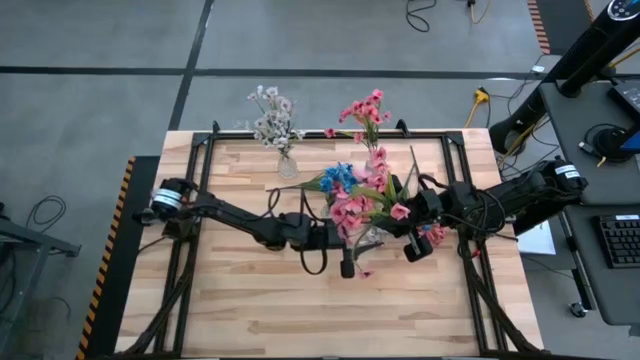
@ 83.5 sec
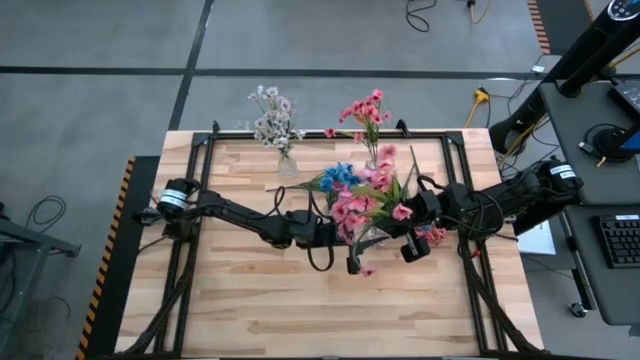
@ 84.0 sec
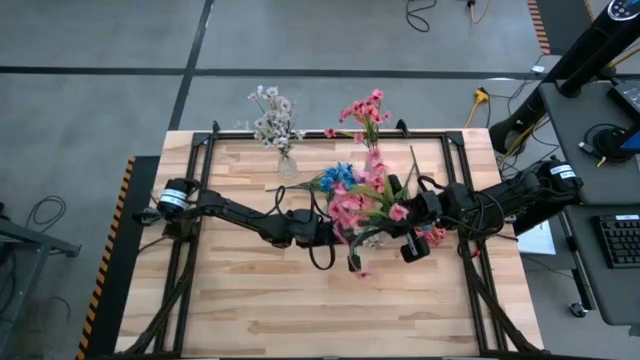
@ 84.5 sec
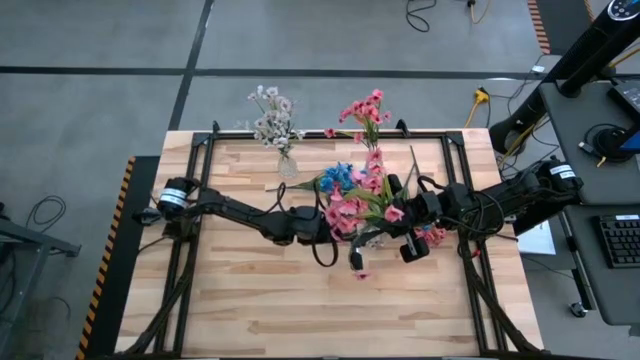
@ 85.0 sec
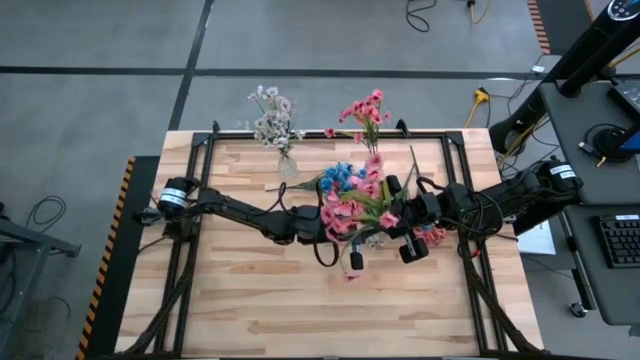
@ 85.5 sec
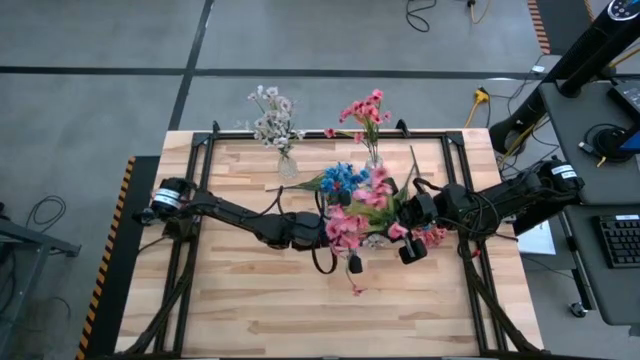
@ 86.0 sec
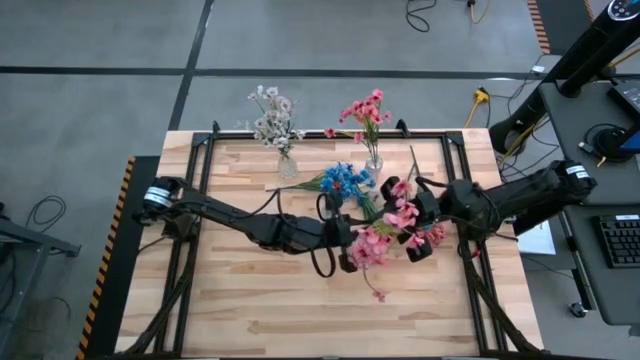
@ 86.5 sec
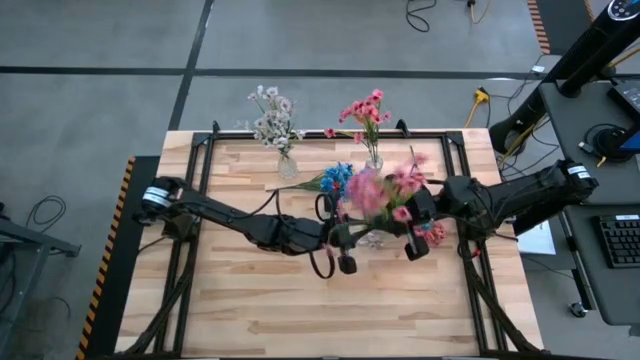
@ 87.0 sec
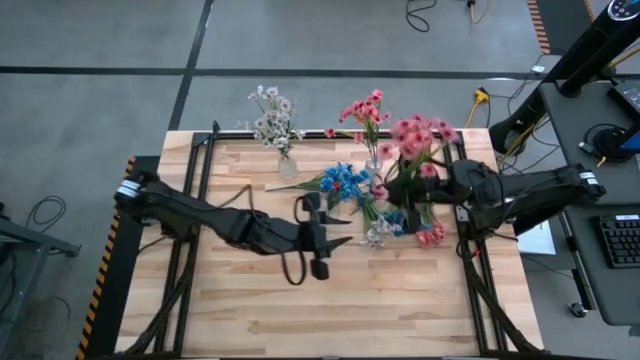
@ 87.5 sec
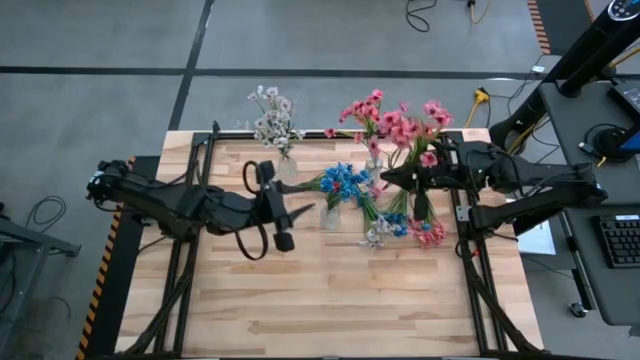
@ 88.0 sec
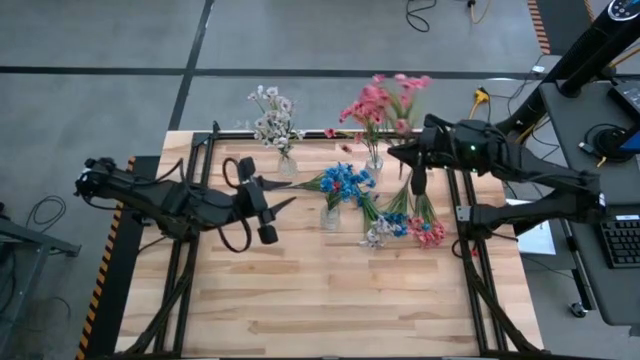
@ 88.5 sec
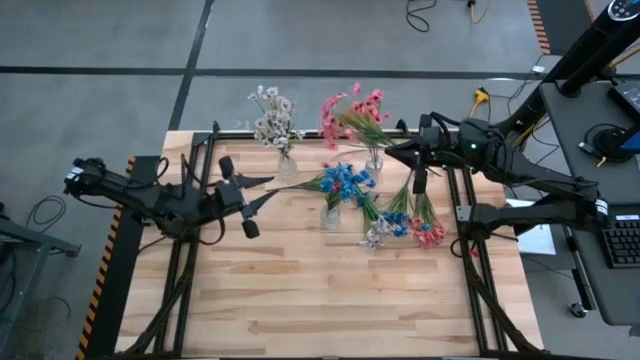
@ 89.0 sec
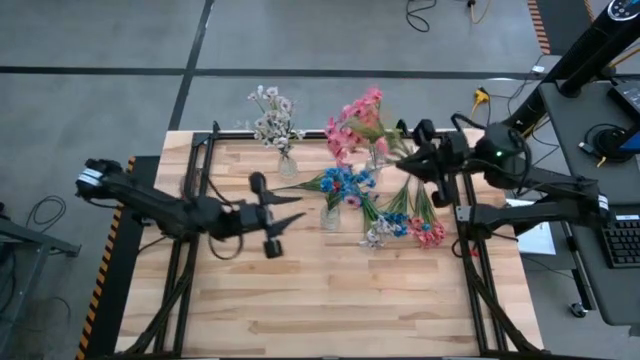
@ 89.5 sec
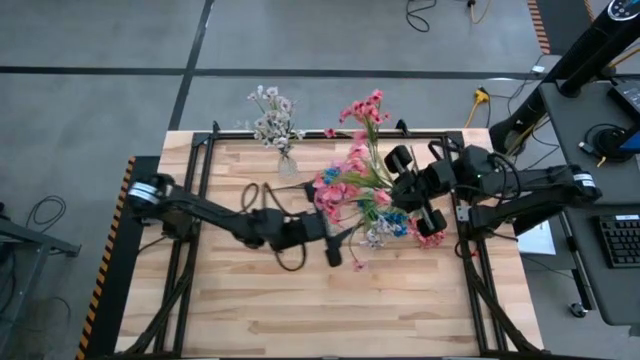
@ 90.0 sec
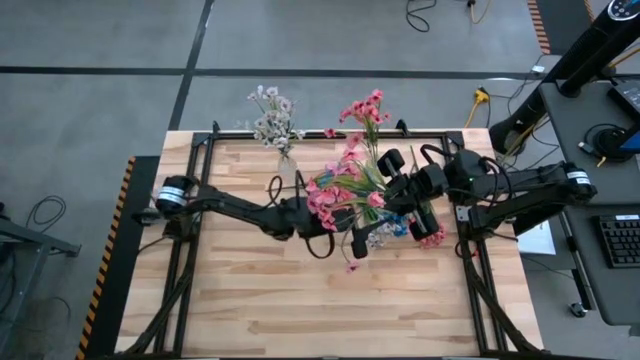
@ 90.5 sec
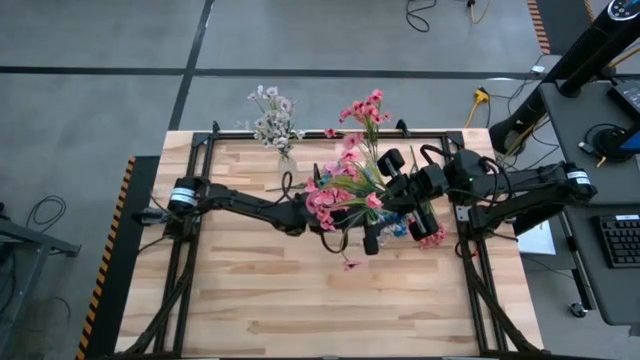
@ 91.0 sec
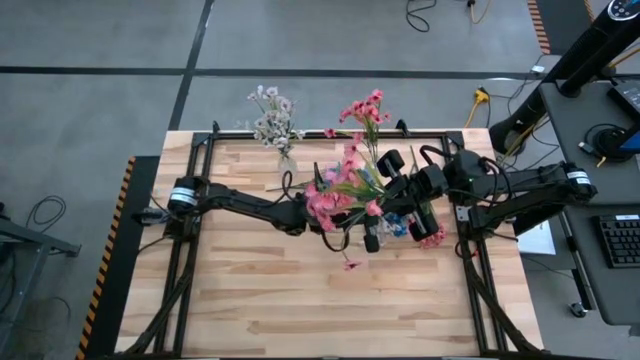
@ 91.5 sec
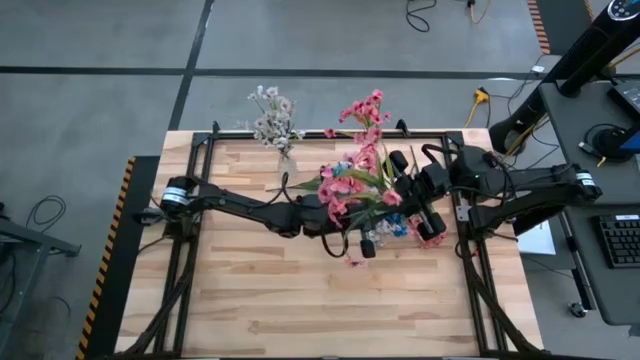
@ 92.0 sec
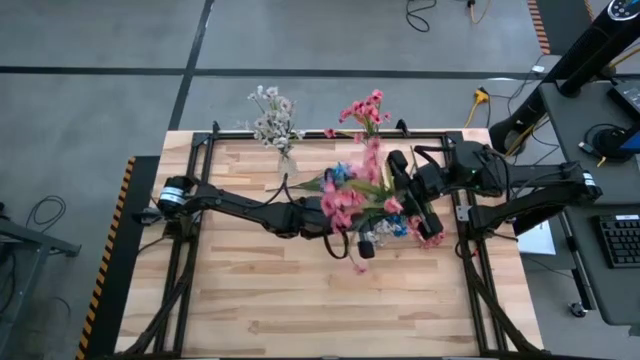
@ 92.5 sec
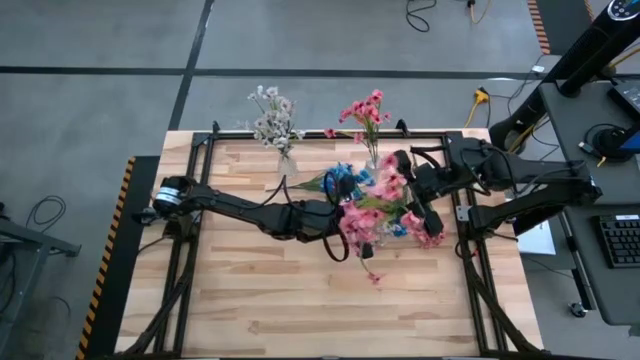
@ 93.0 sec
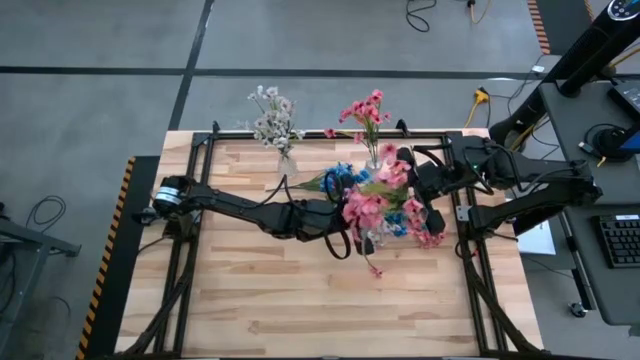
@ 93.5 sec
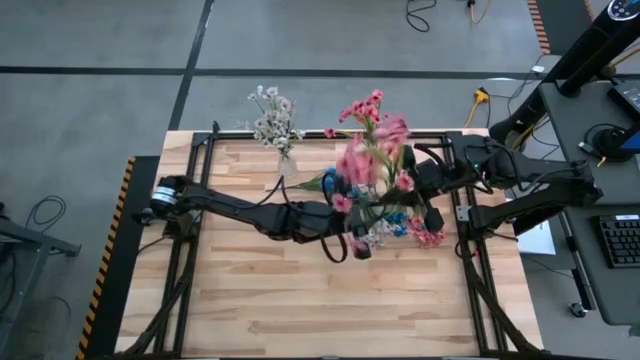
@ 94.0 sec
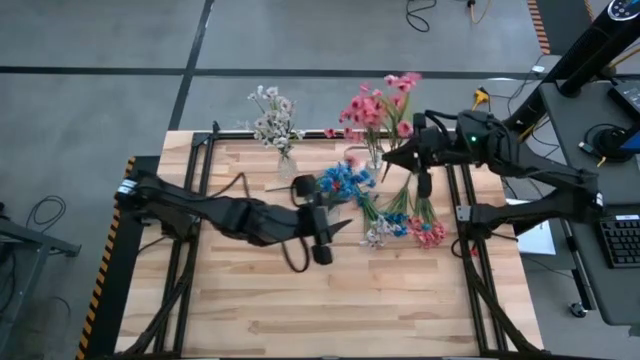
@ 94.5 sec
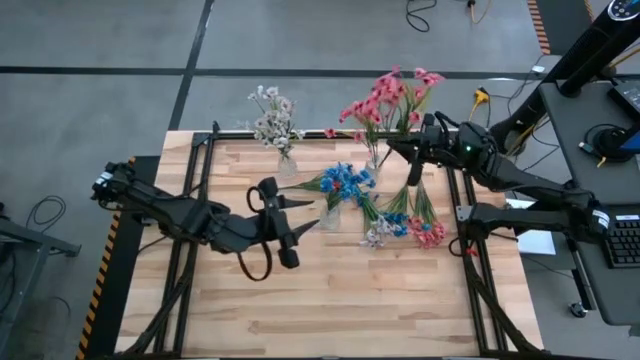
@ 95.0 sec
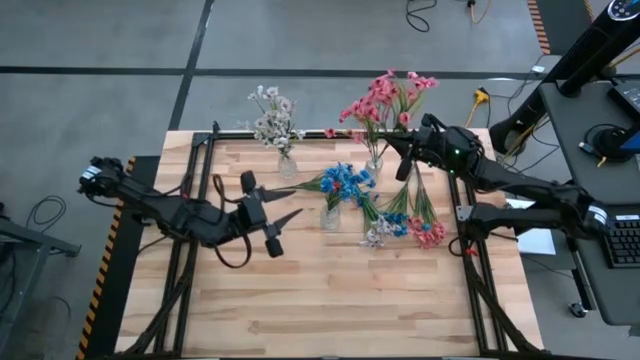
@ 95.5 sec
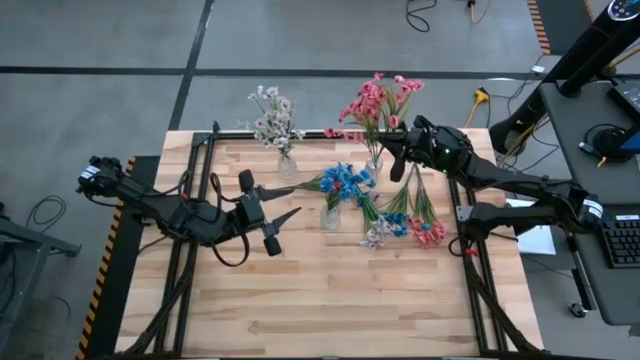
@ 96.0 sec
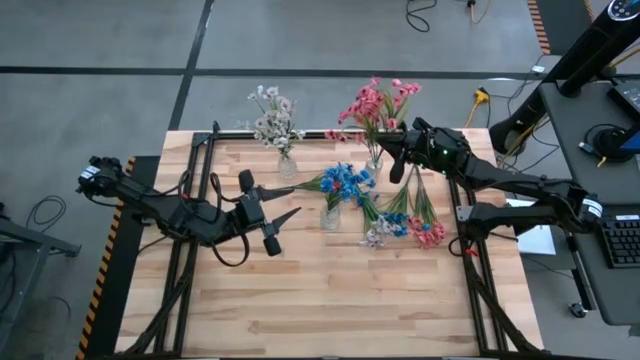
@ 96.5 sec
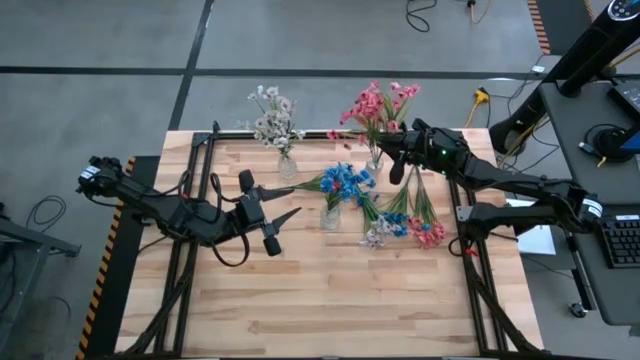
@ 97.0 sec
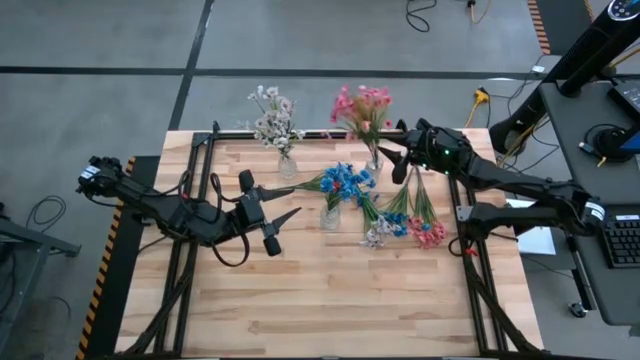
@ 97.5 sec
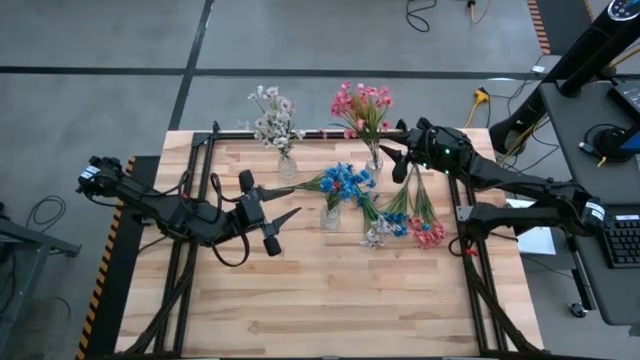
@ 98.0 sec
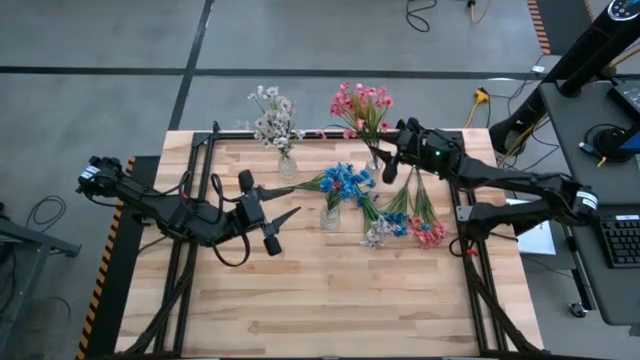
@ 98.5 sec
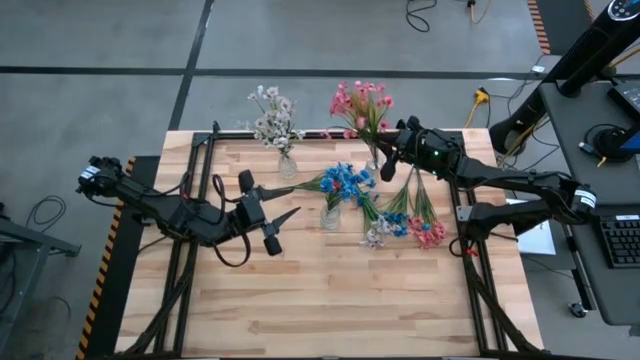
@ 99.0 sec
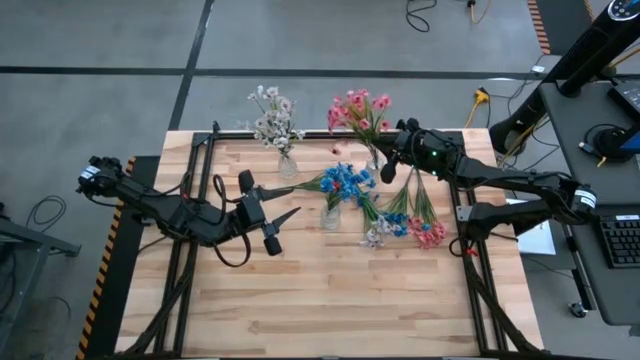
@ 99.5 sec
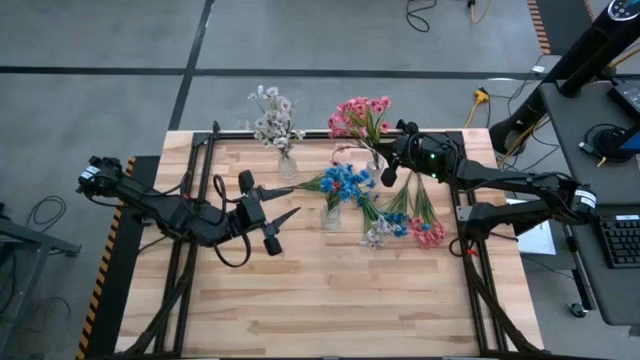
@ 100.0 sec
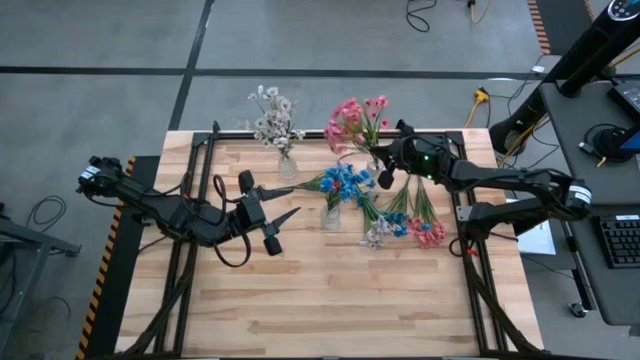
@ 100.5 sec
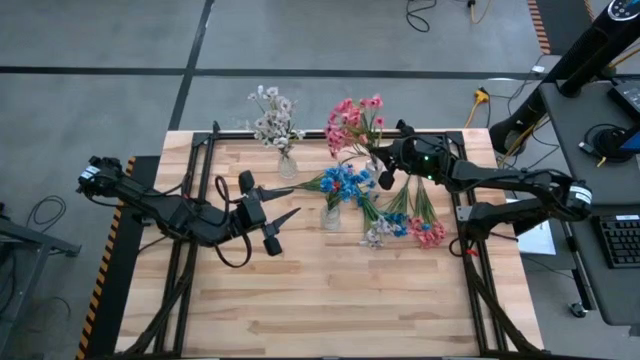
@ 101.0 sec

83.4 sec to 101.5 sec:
Task: Sort flowers into vase by color
Put the right pink flowers into the right transparent vase

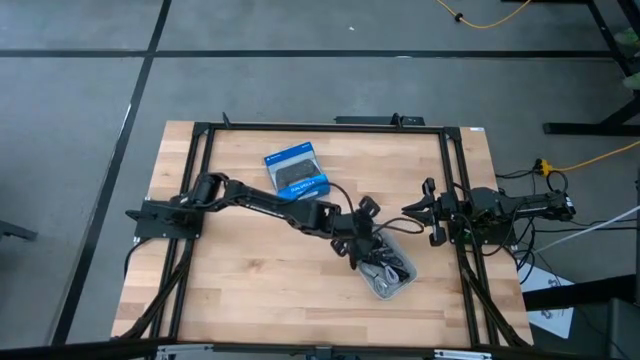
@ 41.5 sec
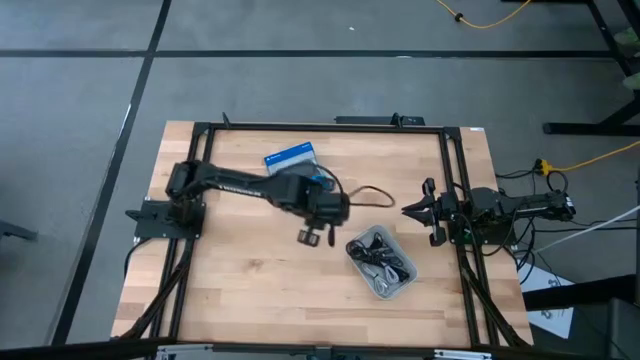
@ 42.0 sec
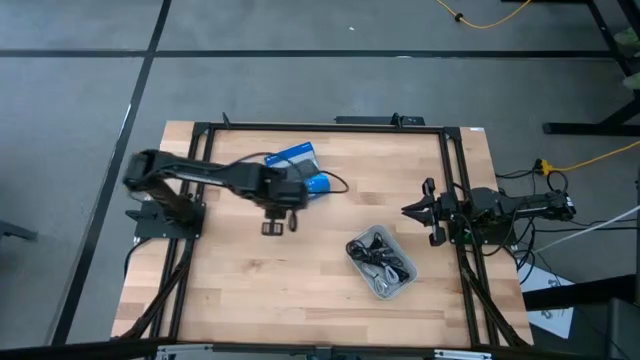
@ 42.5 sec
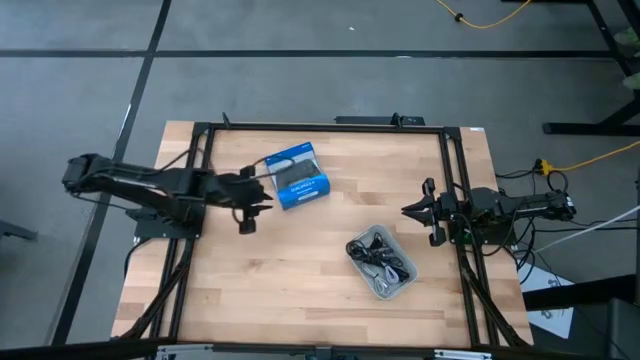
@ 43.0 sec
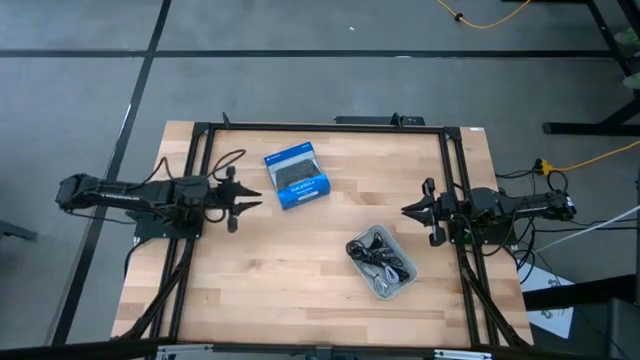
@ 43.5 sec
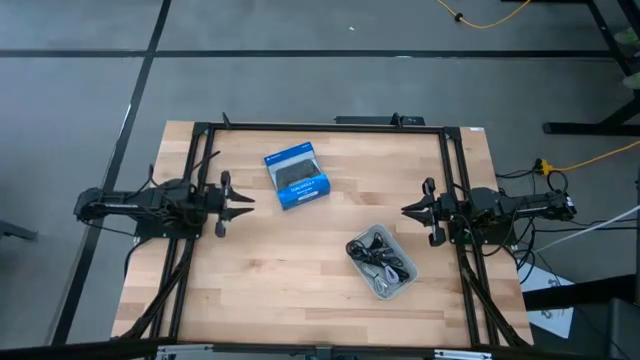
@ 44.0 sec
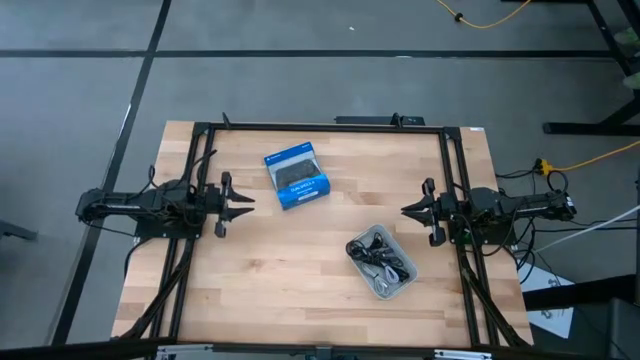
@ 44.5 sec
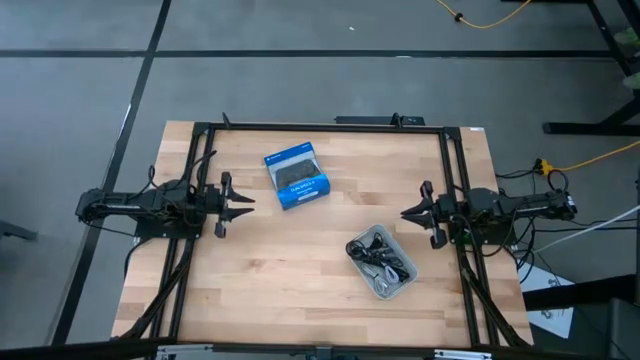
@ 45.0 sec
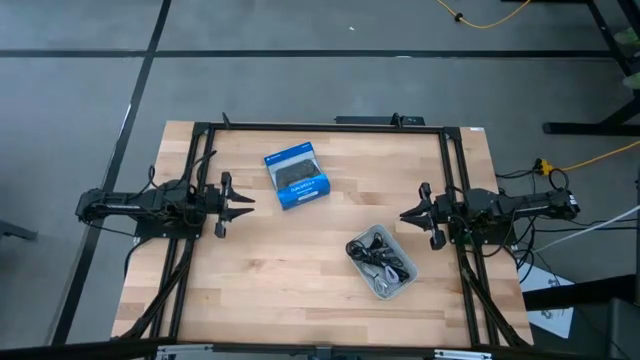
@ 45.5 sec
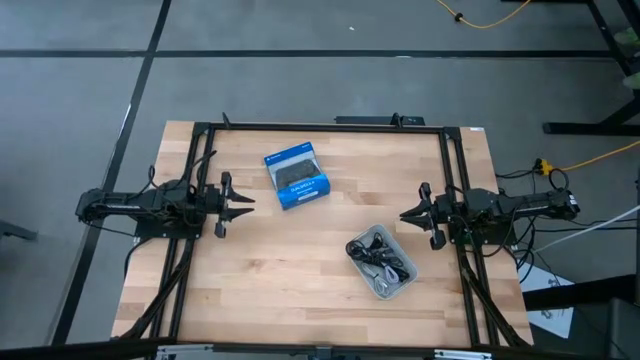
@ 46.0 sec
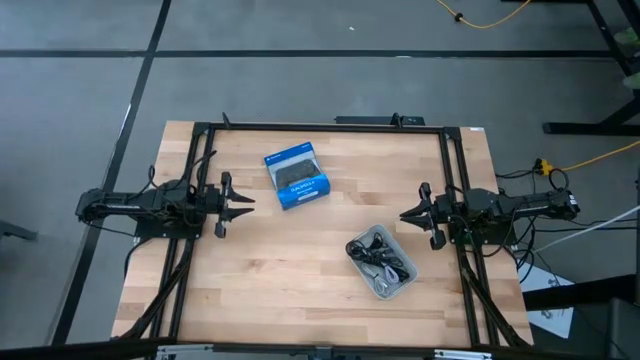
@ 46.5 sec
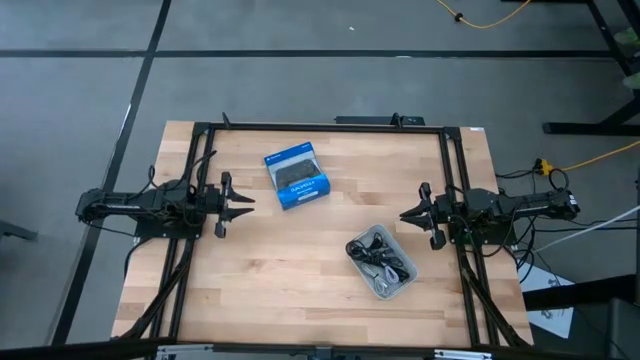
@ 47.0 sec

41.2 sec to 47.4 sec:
Task: Pick and place USB-C Cables
Return to Home Position
